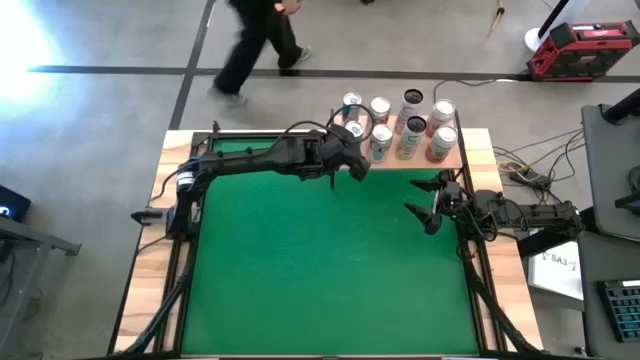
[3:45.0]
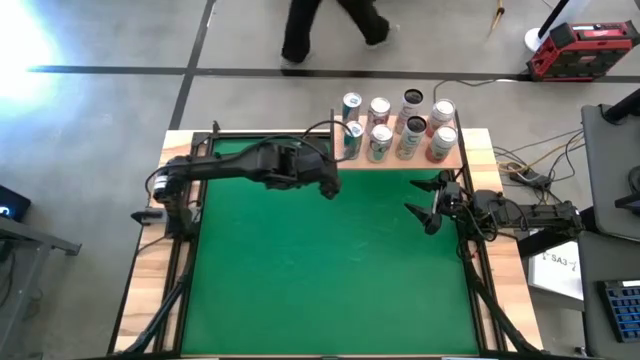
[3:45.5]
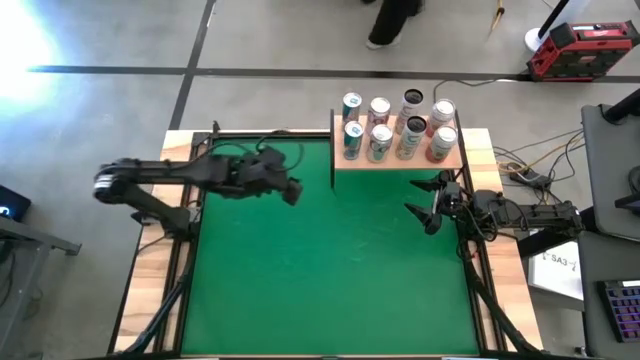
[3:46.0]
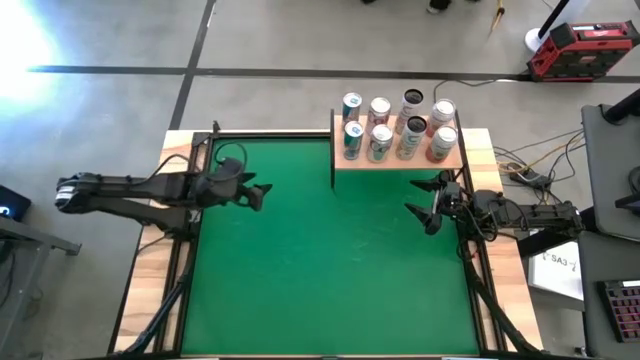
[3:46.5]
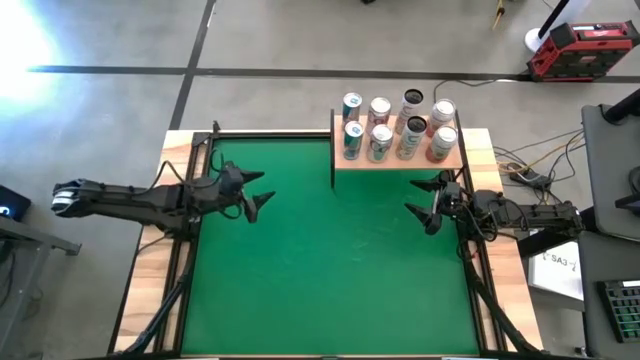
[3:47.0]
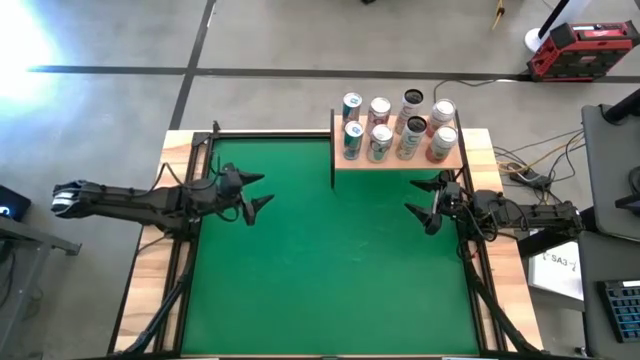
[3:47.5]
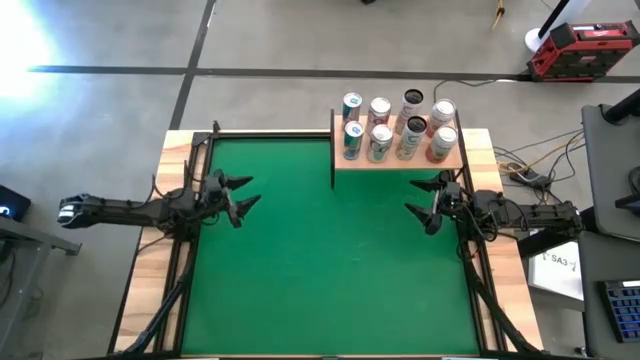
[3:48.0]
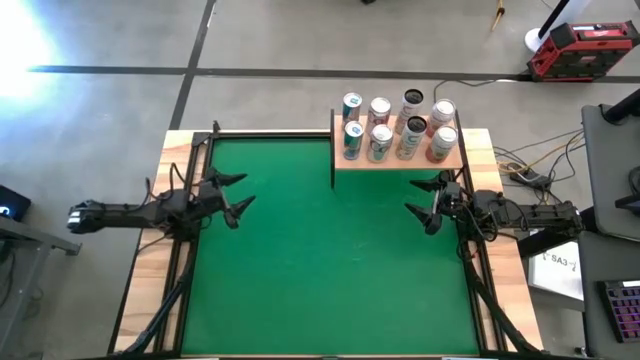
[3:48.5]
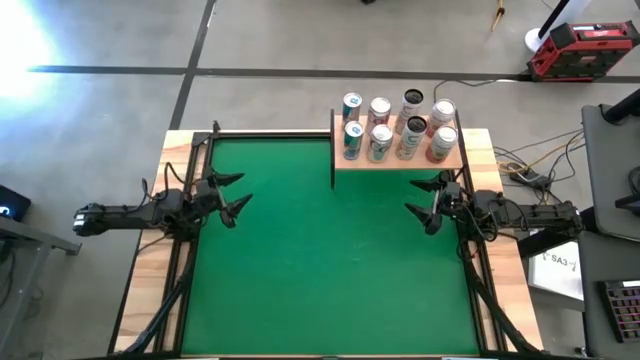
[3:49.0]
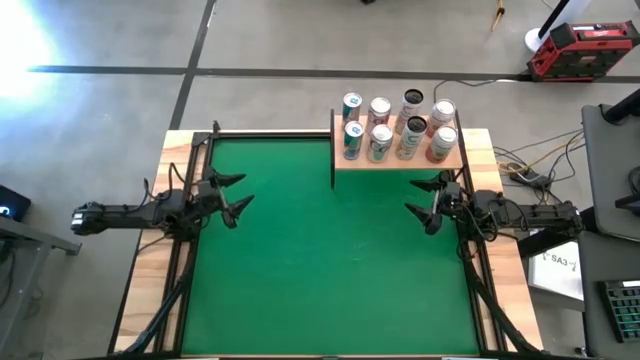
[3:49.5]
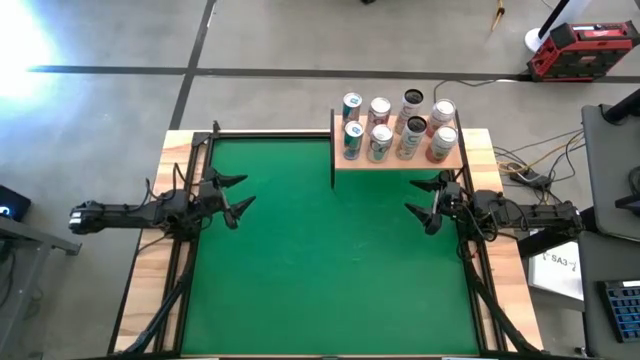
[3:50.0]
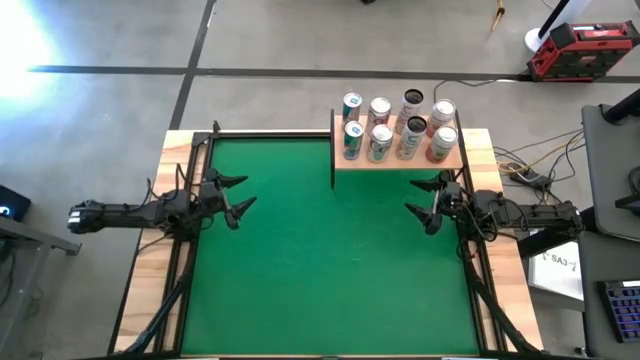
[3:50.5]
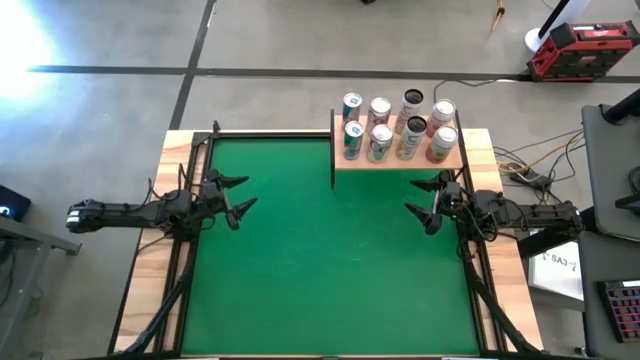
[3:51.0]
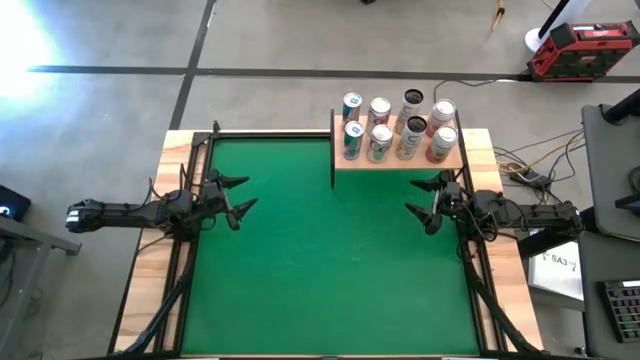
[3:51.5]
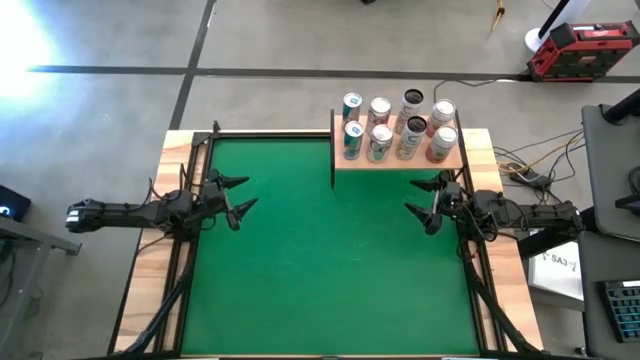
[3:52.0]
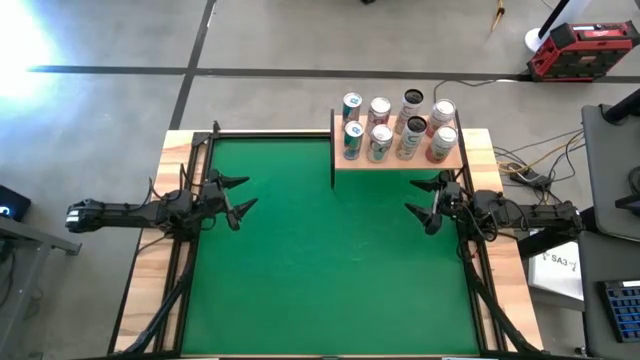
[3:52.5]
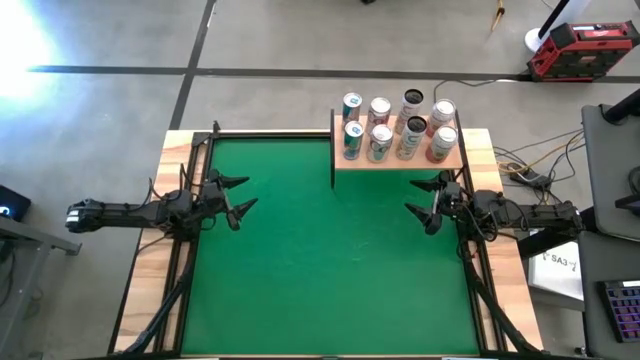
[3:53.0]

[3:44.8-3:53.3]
Task: Place canned beverage on shelf
Return to Home Position

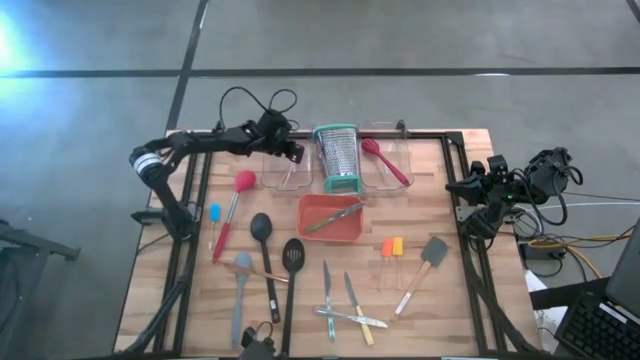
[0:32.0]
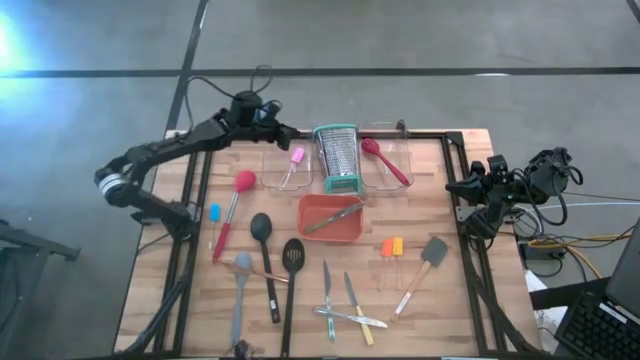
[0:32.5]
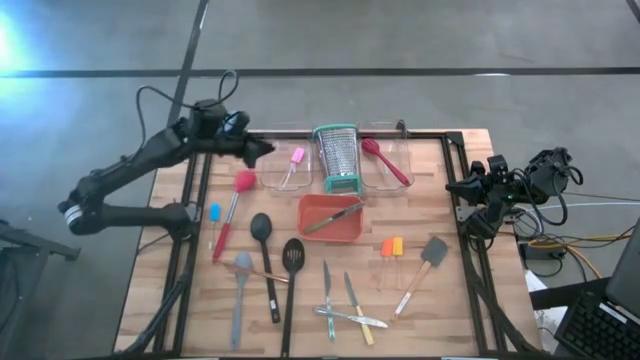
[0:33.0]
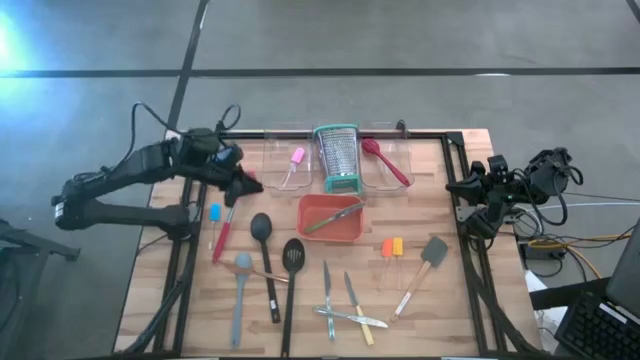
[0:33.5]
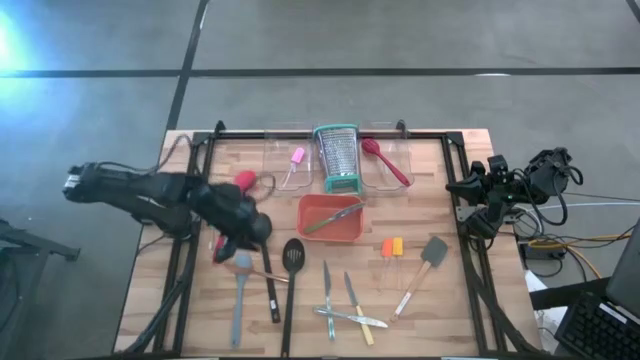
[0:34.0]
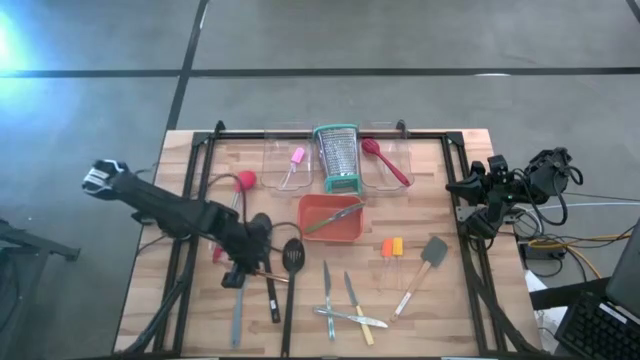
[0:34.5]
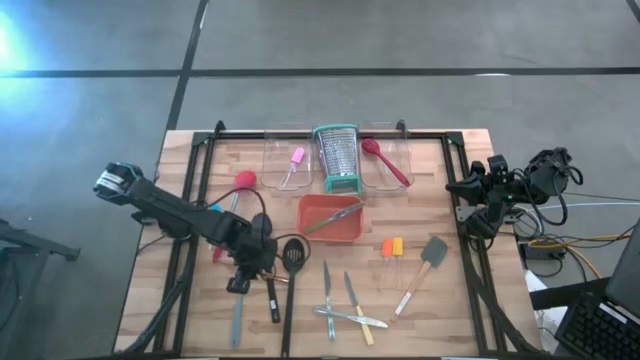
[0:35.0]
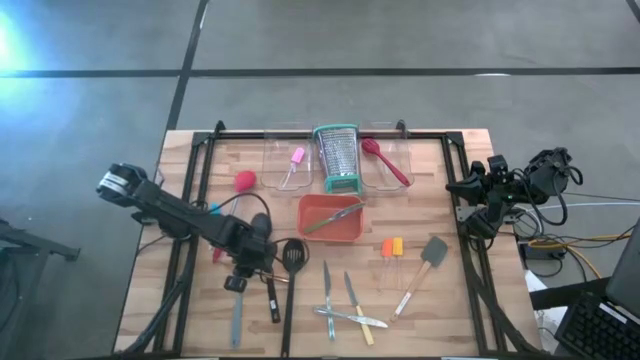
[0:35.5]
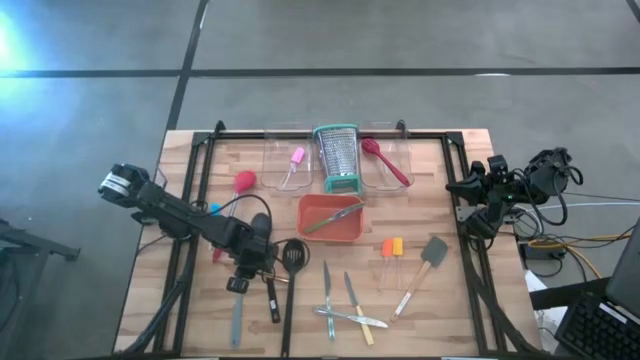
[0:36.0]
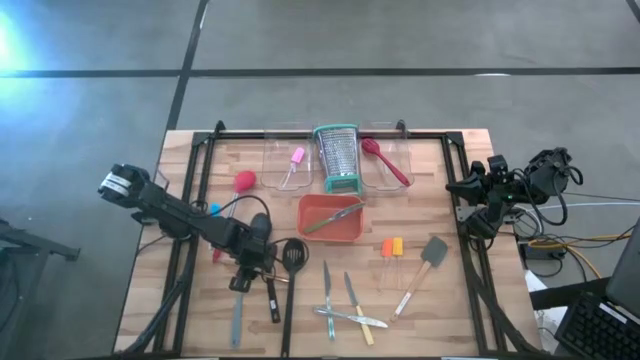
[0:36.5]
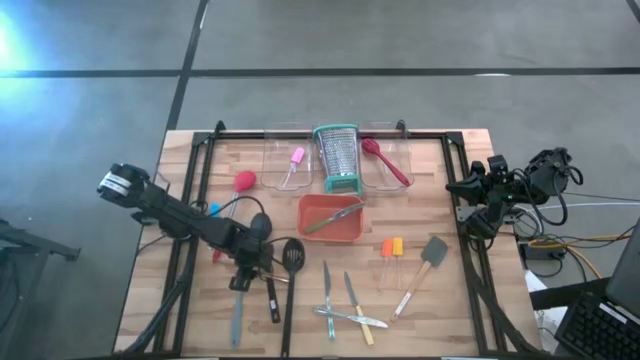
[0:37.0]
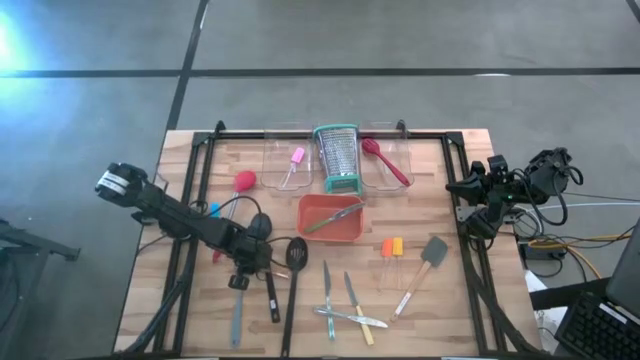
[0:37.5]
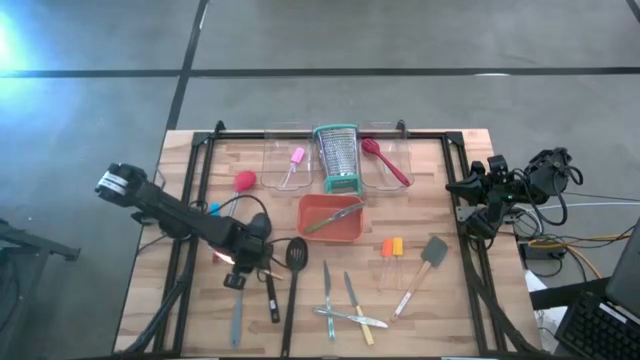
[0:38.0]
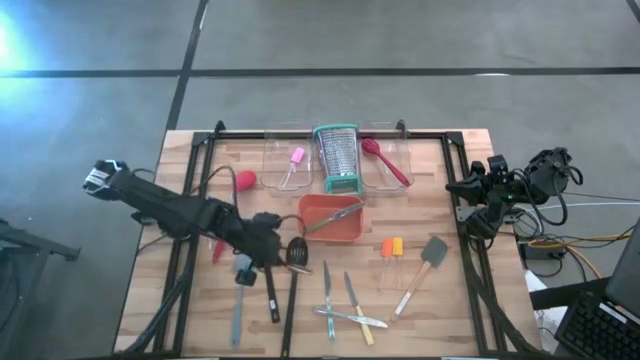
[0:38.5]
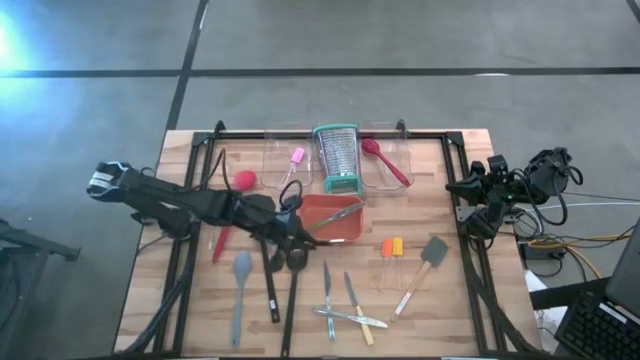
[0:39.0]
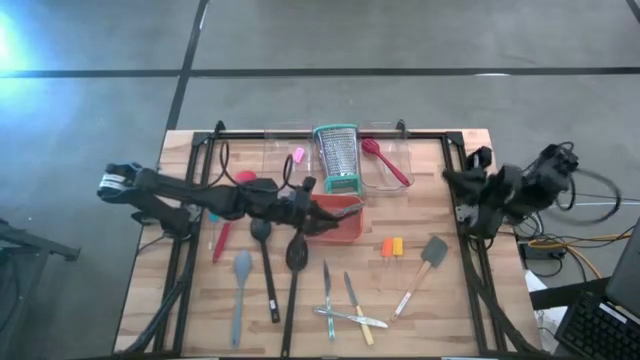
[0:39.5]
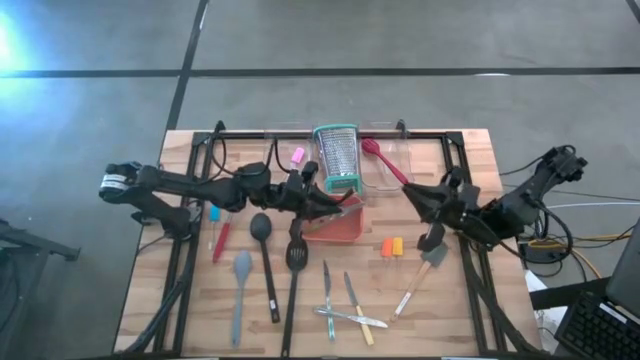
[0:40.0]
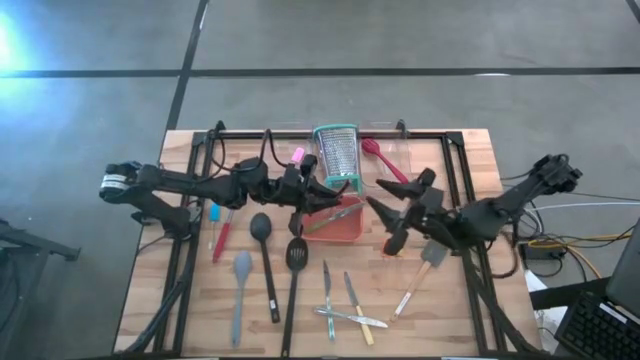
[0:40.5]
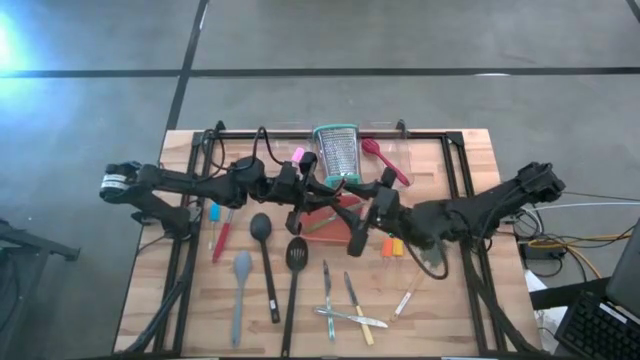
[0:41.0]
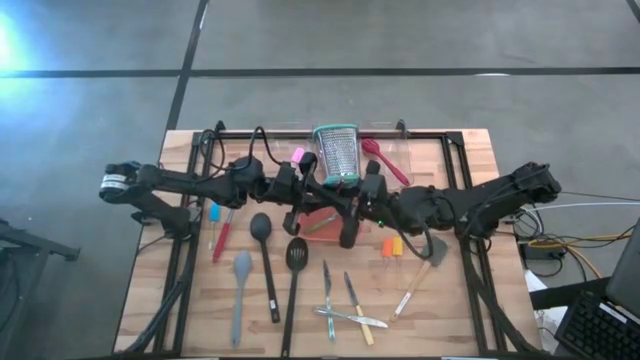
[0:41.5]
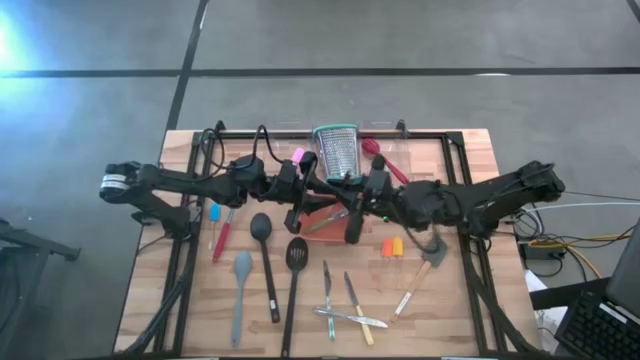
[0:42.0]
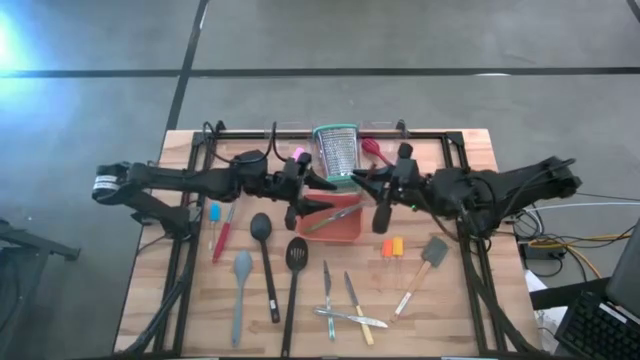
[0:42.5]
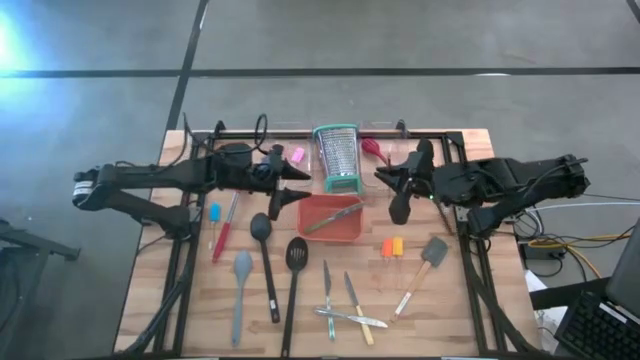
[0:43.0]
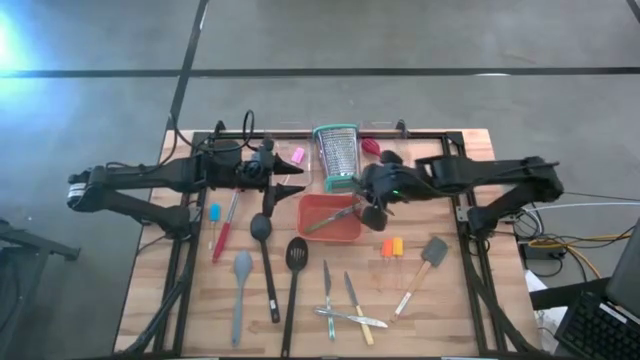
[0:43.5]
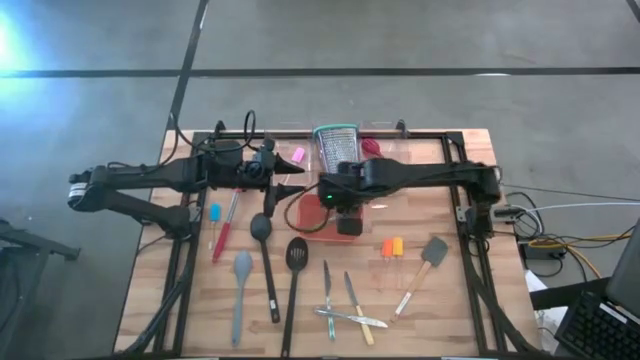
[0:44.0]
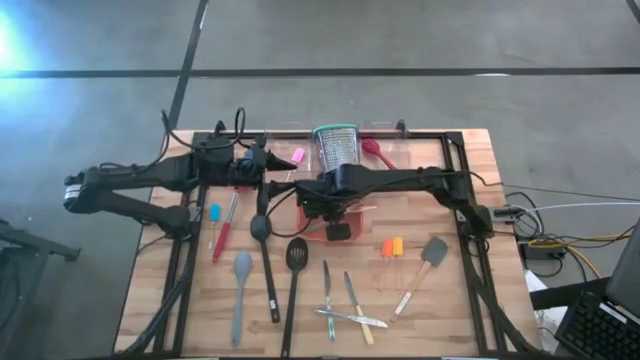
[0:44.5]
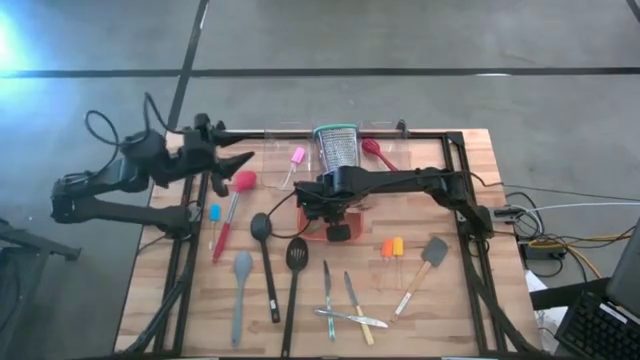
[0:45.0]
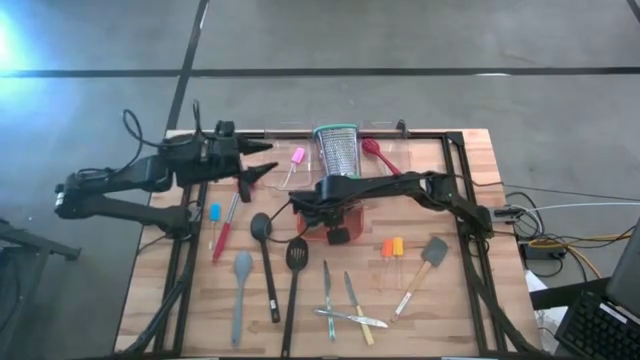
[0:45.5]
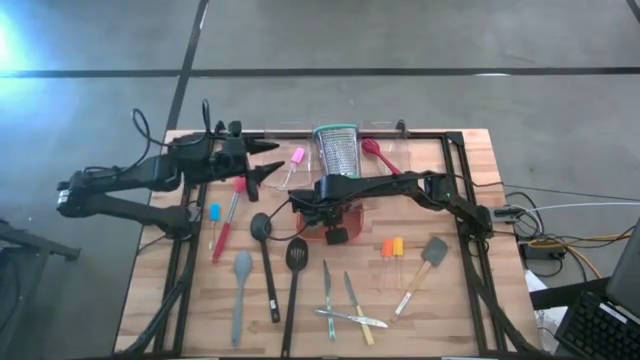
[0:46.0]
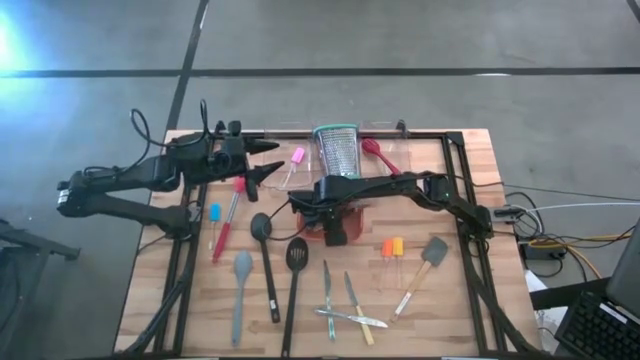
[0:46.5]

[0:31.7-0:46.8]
Task: Pick & Place Kitchen Items
Put the gold knife into the orange bin
